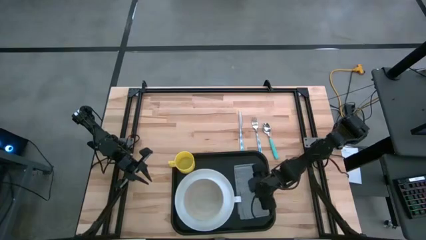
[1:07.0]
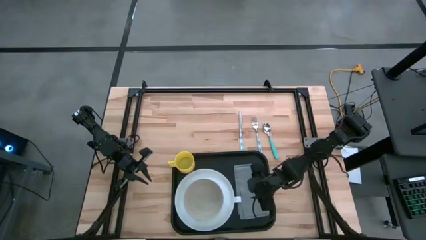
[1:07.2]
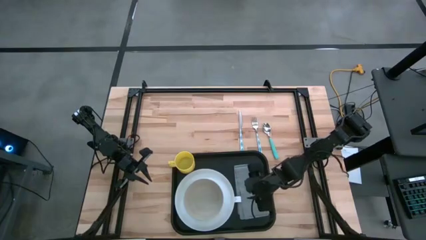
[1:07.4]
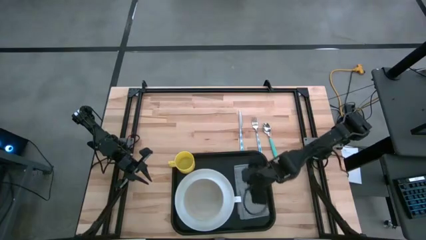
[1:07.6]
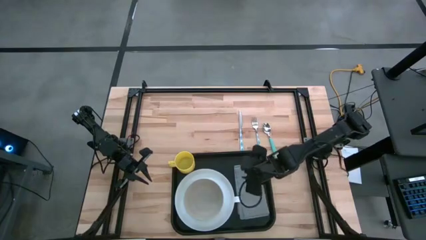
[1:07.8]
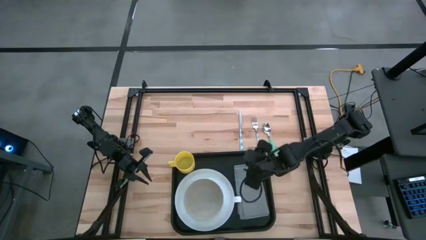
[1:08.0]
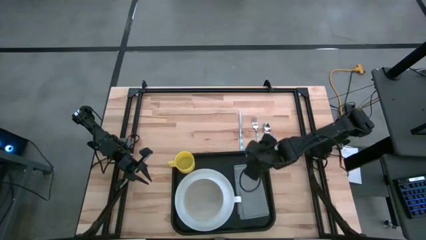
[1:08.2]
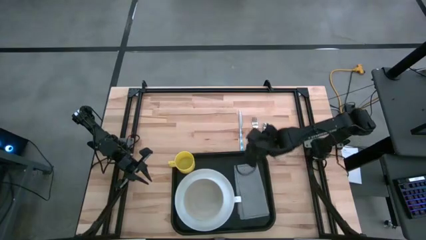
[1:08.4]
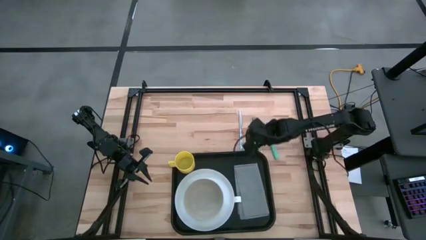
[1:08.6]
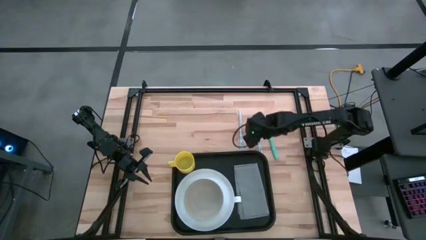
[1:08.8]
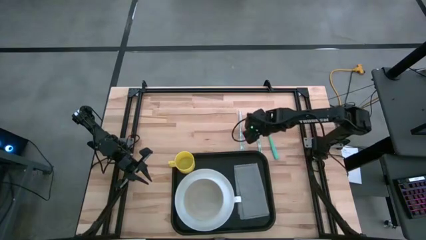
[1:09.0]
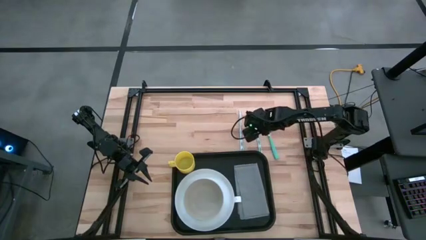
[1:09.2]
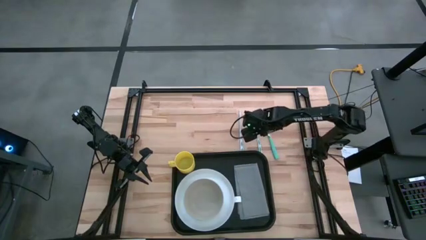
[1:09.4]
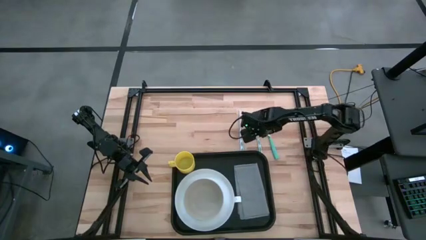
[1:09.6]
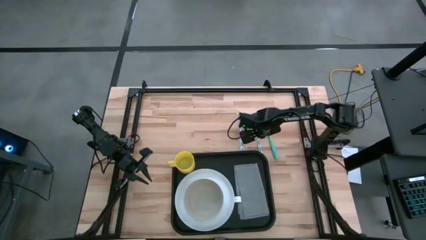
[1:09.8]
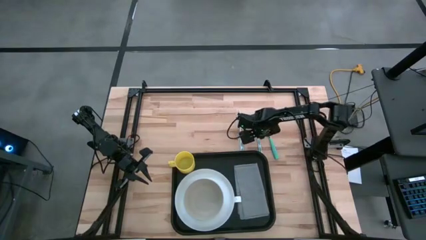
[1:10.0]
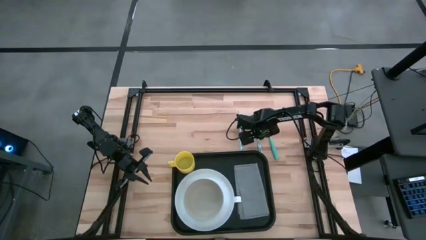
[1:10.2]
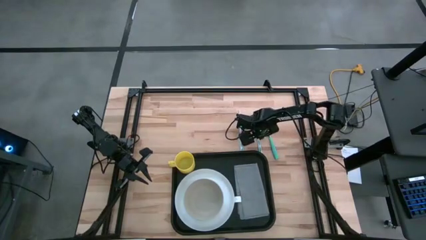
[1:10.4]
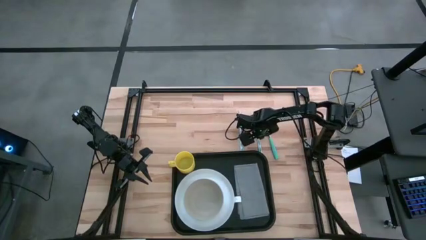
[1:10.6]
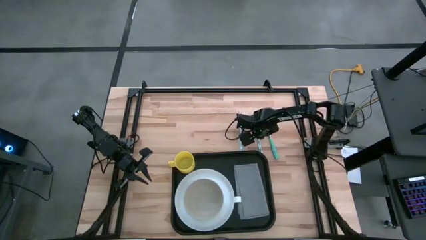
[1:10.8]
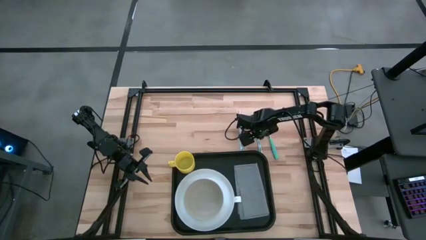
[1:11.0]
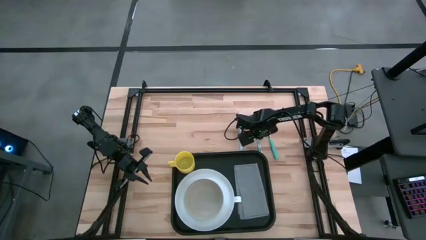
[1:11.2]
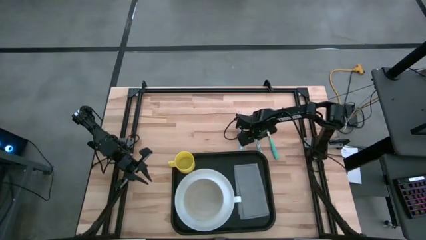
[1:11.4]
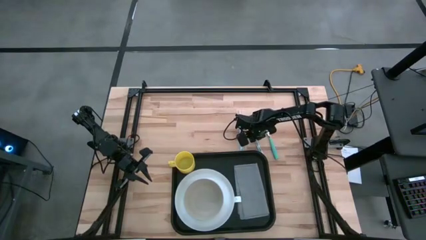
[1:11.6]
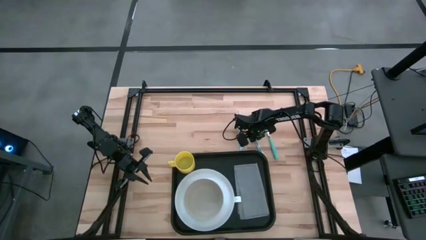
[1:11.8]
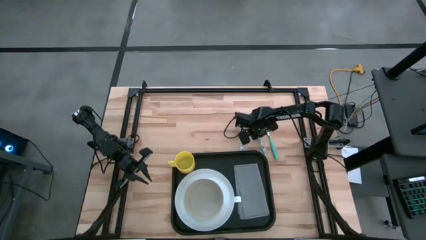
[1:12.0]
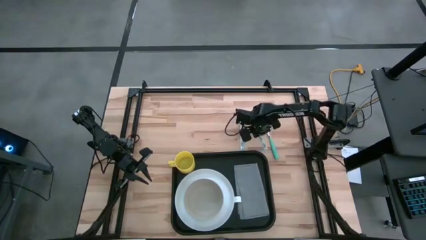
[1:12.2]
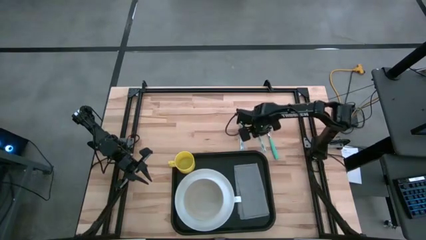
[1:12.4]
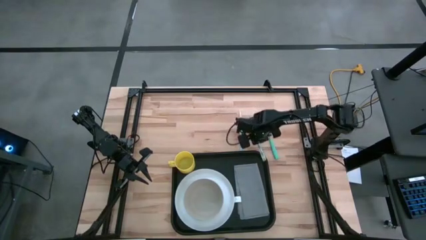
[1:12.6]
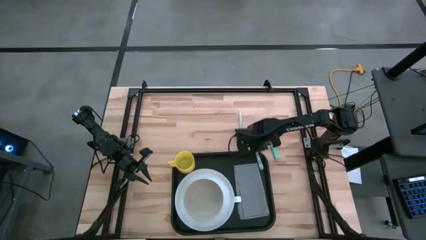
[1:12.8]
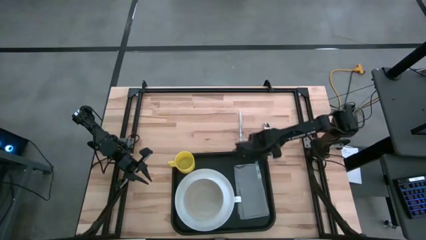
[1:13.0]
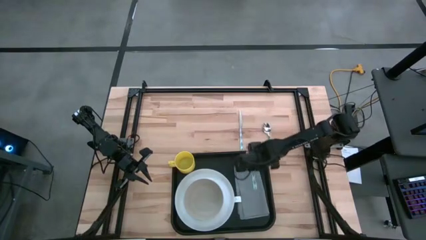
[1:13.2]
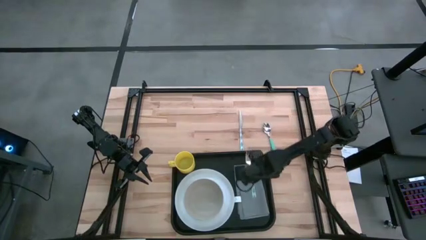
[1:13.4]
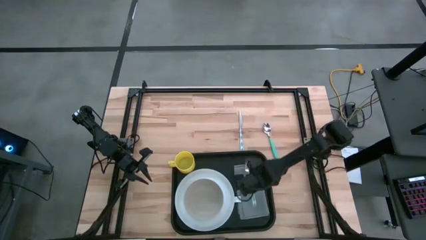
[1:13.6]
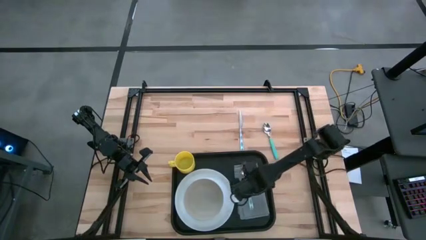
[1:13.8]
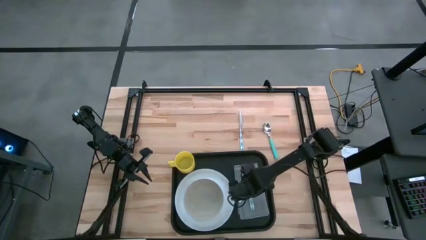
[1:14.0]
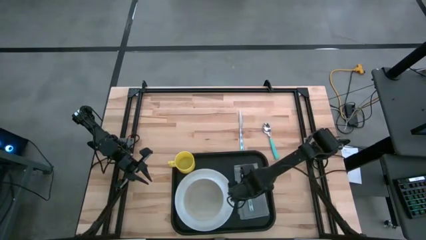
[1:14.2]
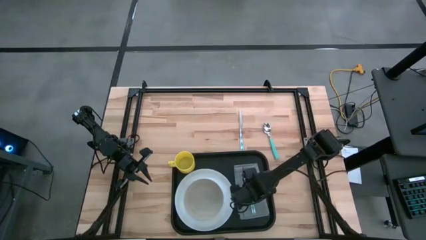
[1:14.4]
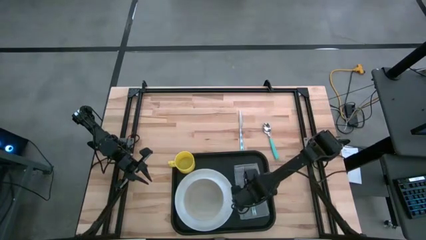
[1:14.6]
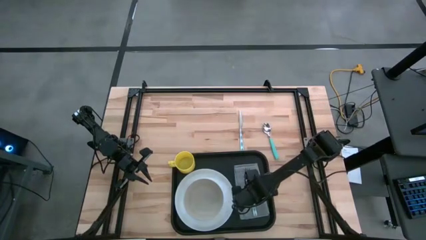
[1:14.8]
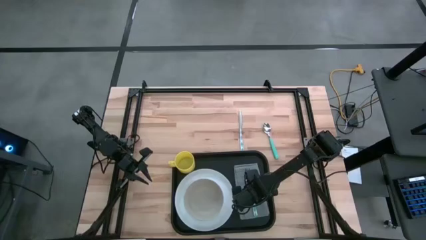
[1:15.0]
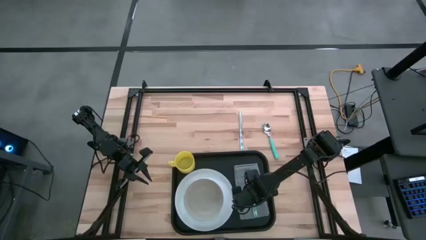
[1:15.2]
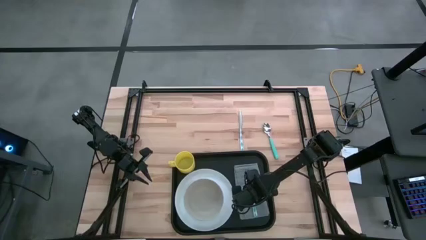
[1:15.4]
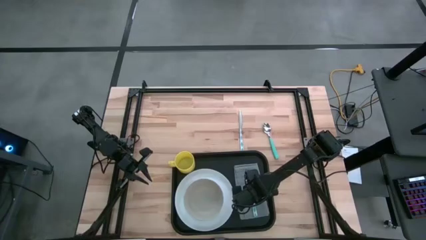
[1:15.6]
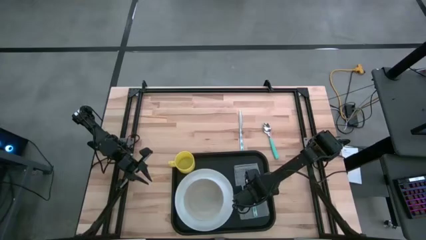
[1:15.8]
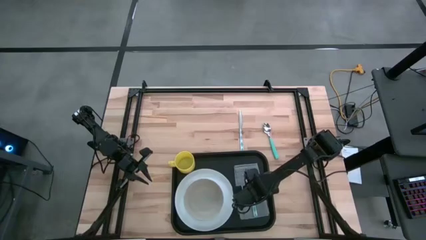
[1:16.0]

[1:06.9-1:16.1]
Task: Set up tray
Put the blue fork on the gray napkin

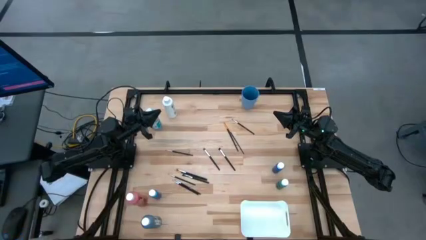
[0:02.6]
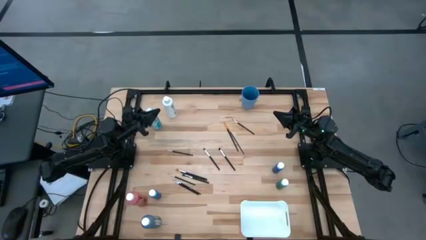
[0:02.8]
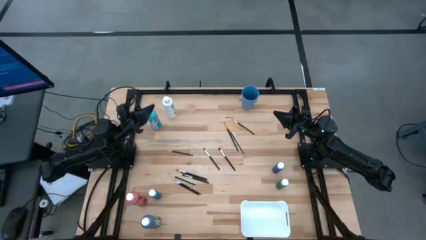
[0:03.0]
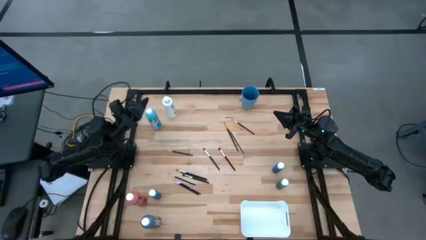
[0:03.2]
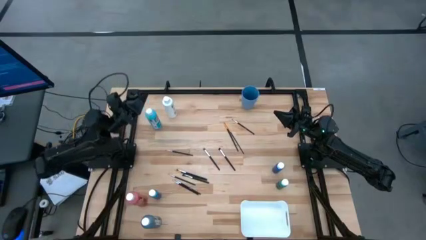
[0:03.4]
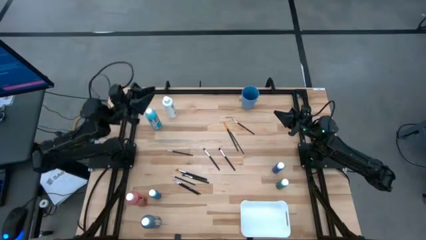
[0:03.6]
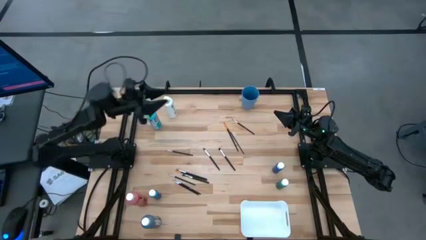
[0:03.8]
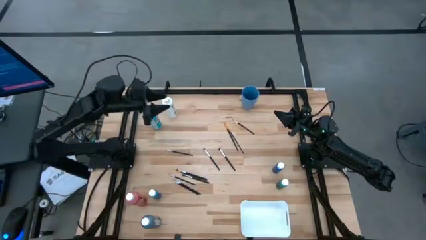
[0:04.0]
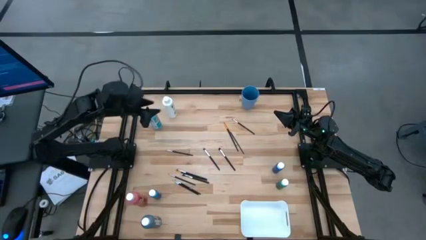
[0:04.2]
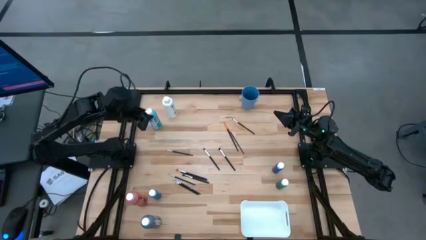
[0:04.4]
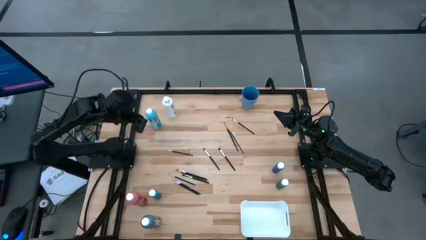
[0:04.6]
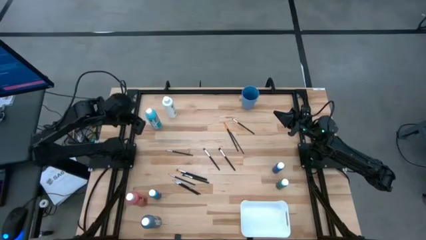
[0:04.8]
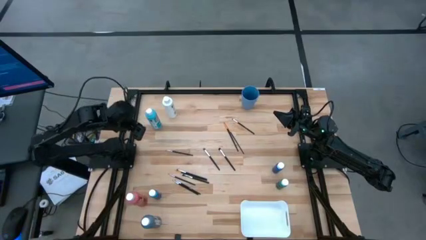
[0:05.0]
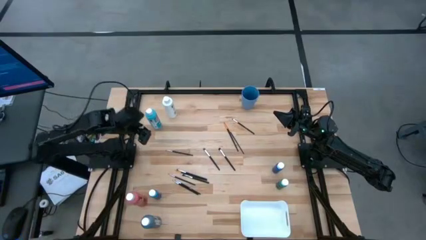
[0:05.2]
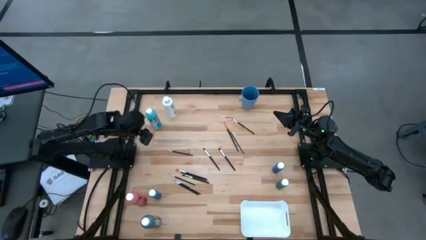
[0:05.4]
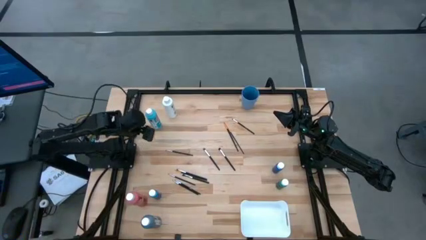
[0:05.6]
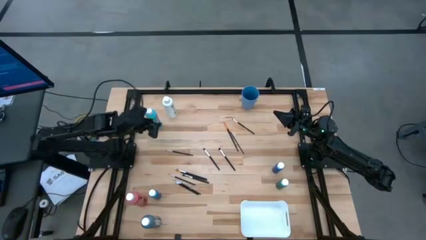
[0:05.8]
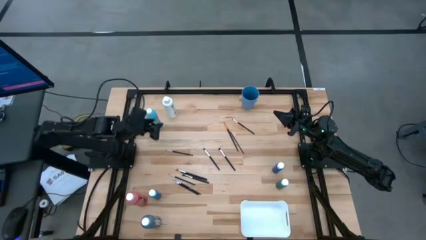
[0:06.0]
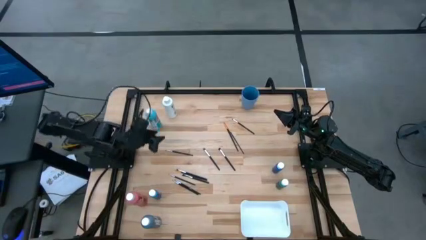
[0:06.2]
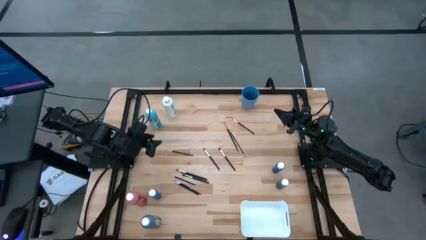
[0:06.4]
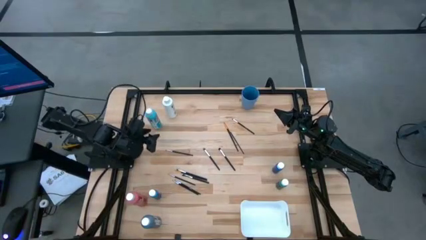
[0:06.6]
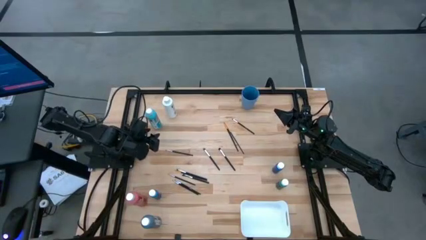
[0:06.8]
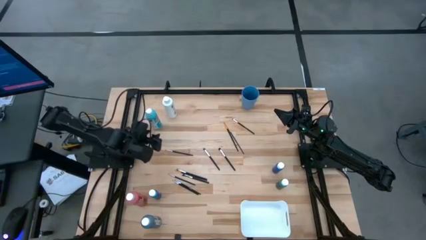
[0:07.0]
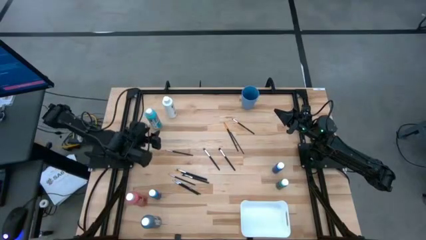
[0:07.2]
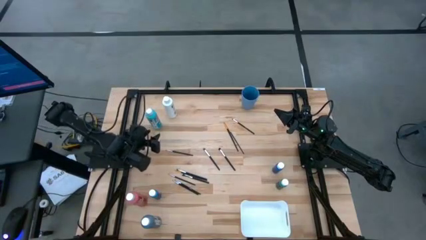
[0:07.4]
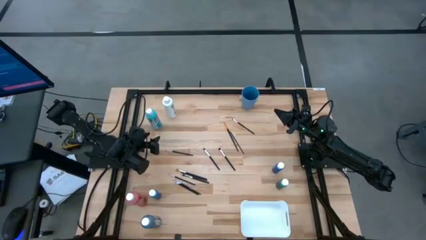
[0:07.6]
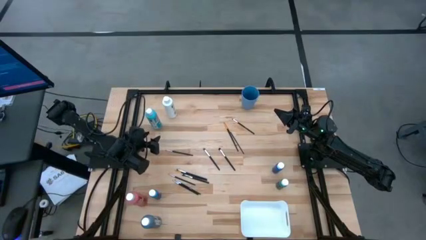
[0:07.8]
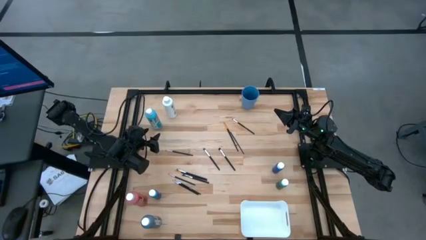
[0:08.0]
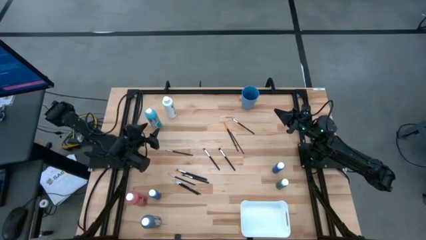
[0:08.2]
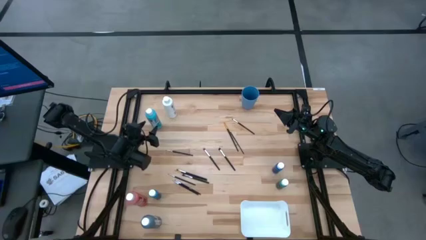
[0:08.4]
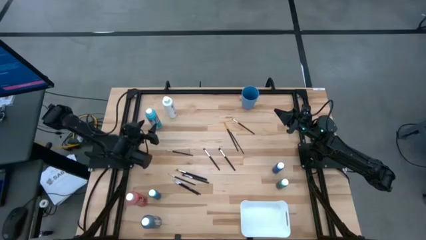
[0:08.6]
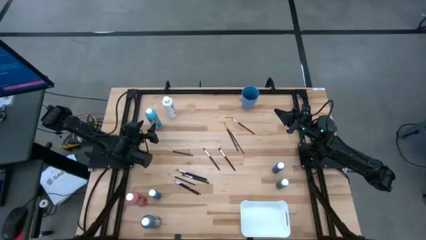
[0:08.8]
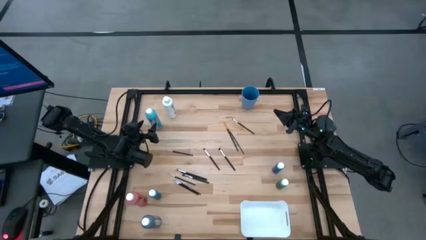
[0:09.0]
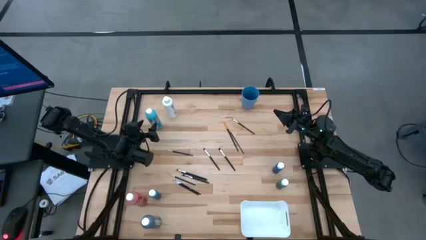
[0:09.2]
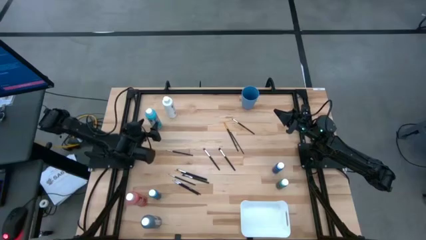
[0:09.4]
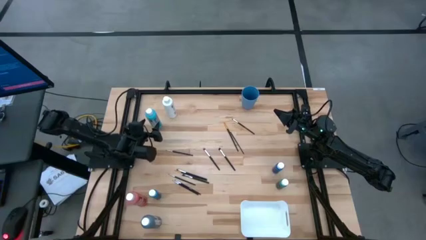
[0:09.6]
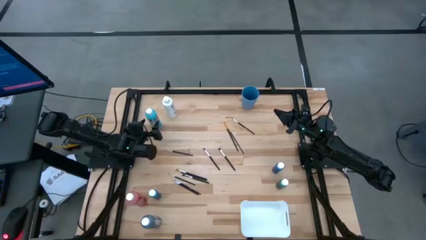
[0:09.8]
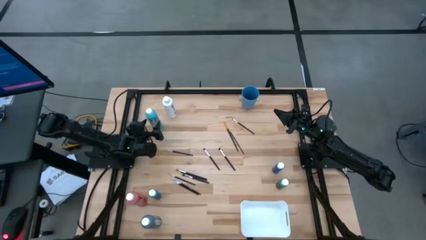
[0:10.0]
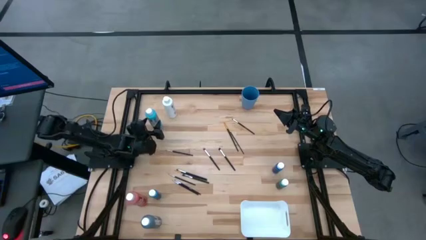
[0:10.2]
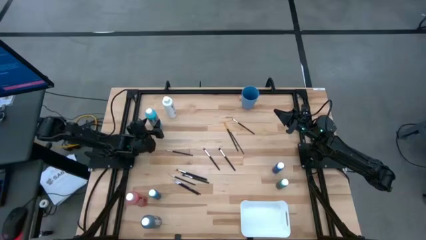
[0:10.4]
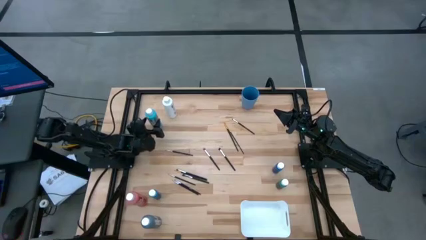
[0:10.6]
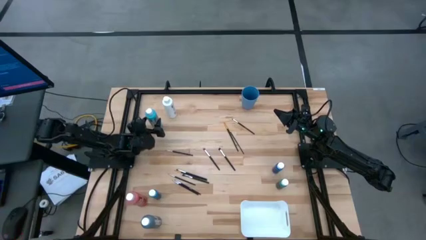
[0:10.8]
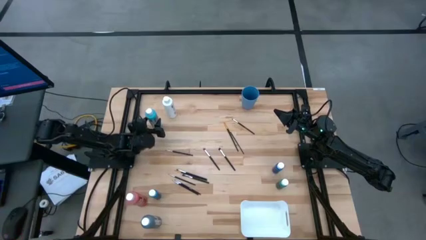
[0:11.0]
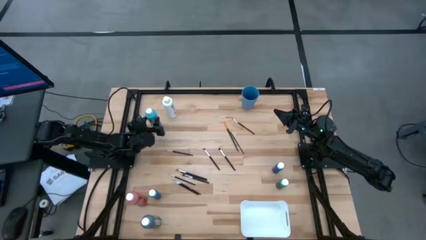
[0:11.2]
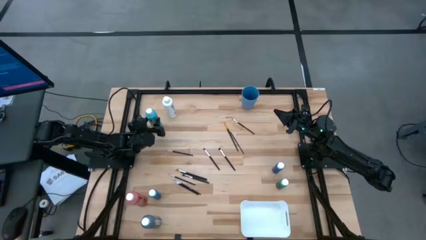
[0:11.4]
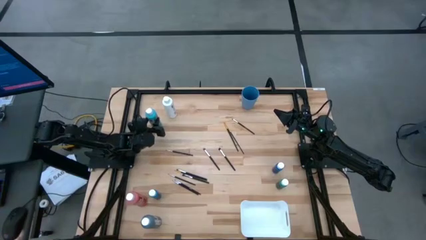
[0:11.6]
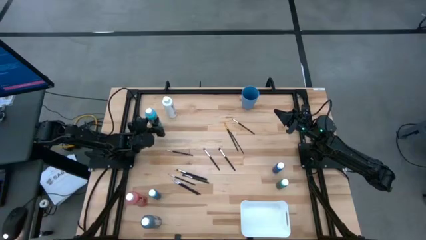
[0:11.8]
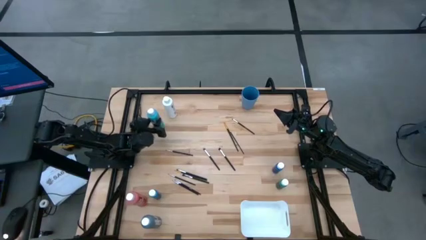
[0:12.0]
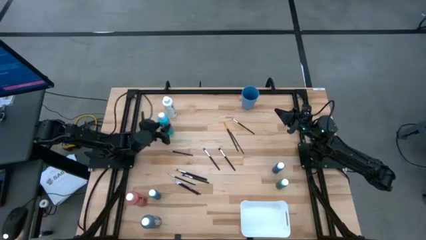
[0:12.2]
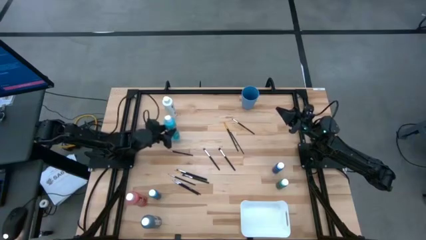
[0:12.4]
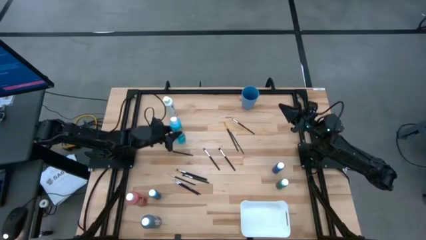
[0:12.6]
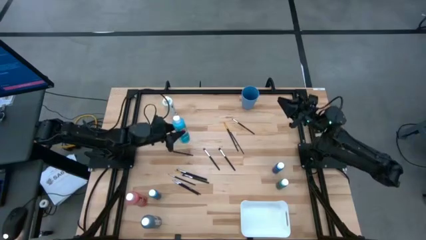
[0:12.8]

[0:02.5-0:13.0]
Task: Pick & Place Paint Supplies
Put the large light blue paint bottle into the white bin
